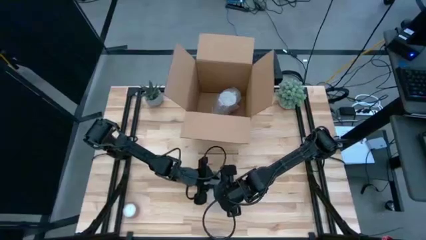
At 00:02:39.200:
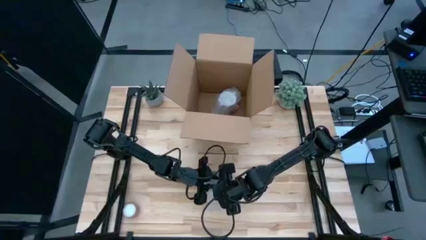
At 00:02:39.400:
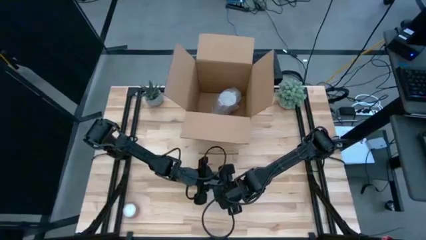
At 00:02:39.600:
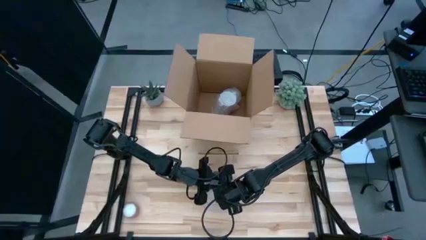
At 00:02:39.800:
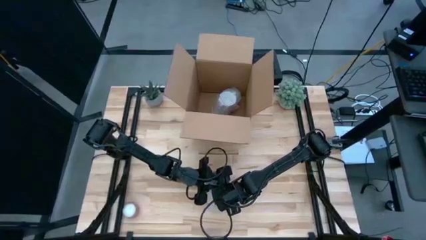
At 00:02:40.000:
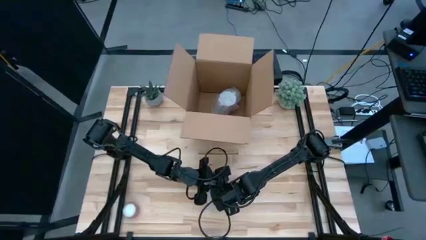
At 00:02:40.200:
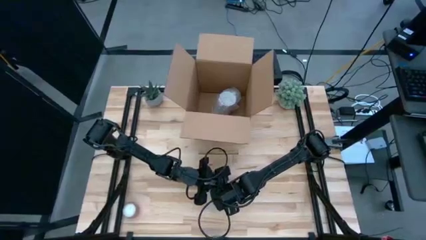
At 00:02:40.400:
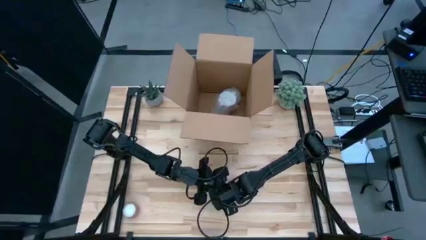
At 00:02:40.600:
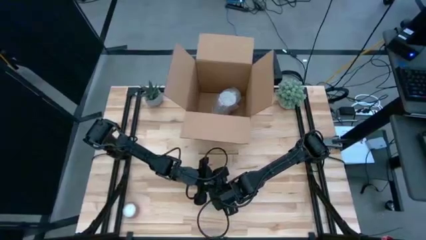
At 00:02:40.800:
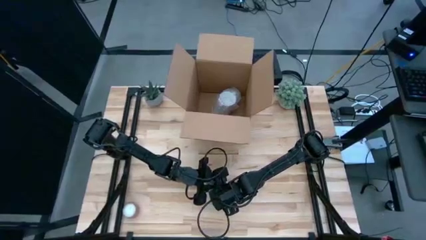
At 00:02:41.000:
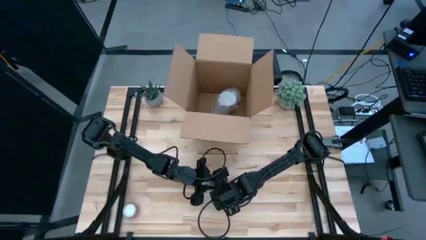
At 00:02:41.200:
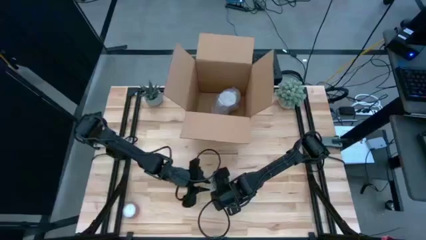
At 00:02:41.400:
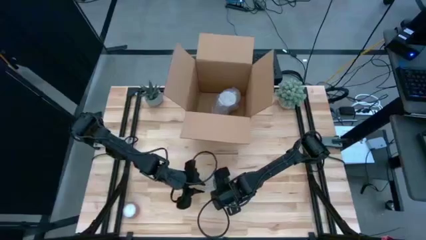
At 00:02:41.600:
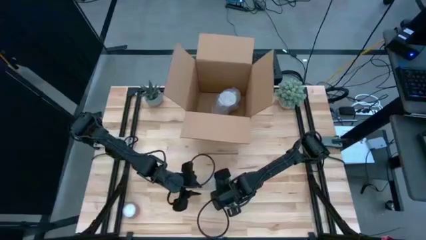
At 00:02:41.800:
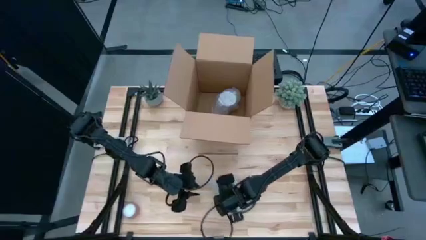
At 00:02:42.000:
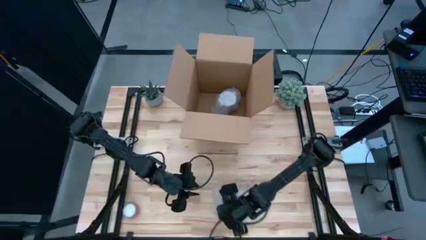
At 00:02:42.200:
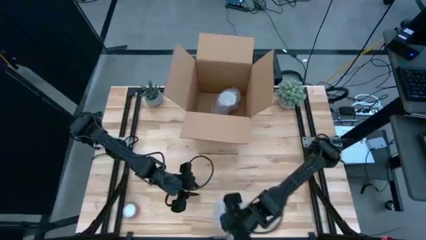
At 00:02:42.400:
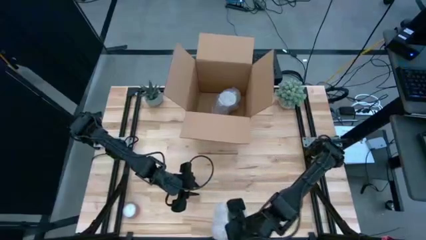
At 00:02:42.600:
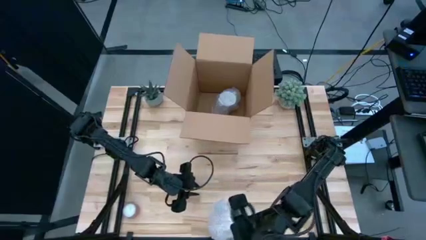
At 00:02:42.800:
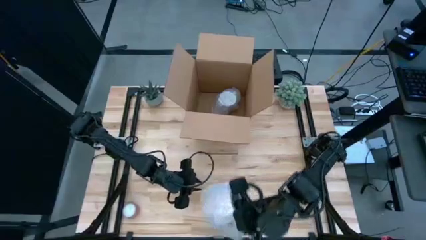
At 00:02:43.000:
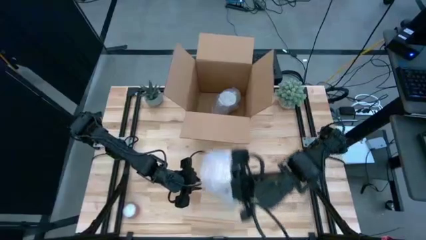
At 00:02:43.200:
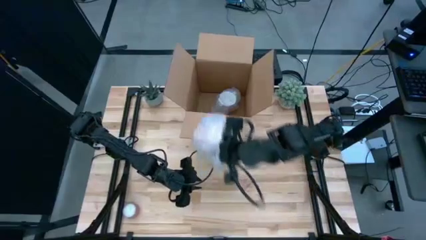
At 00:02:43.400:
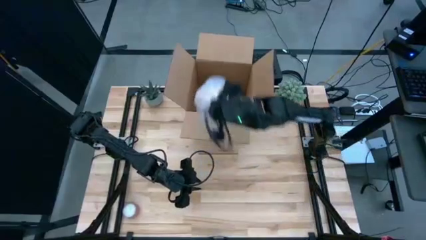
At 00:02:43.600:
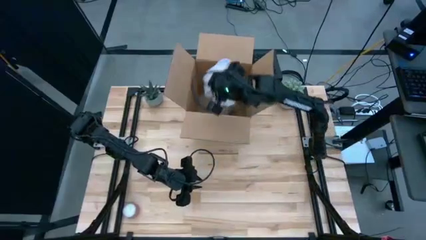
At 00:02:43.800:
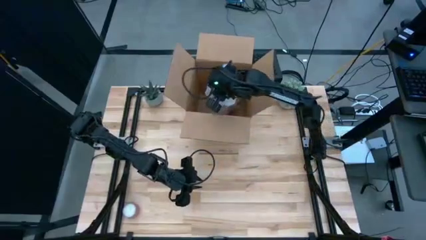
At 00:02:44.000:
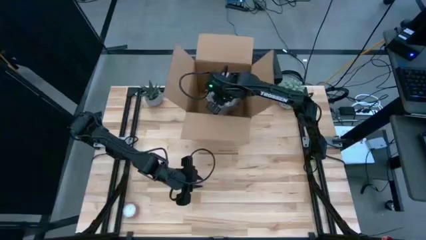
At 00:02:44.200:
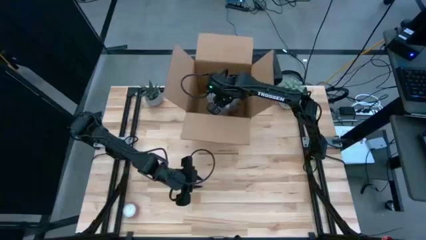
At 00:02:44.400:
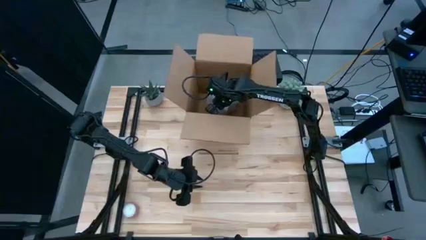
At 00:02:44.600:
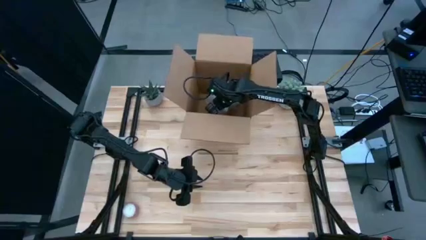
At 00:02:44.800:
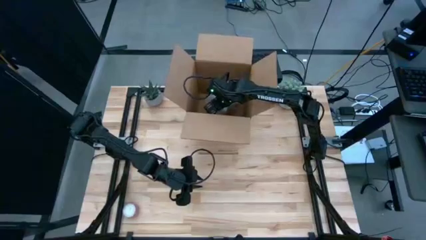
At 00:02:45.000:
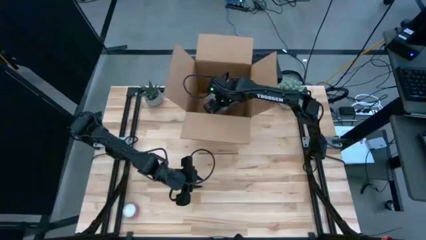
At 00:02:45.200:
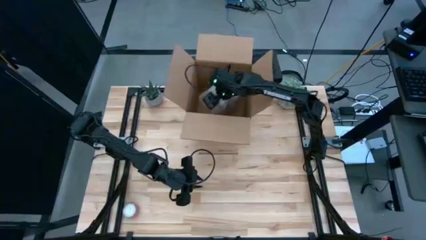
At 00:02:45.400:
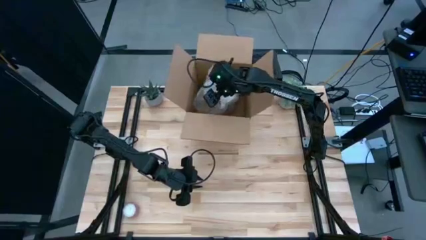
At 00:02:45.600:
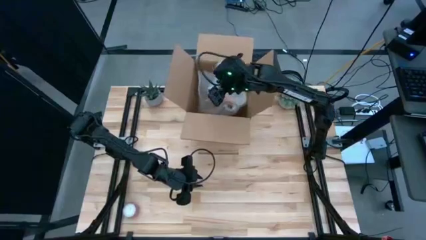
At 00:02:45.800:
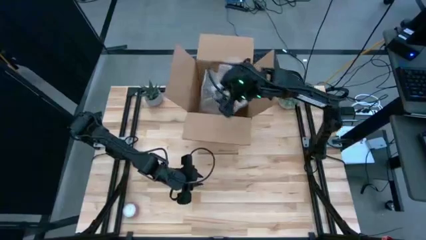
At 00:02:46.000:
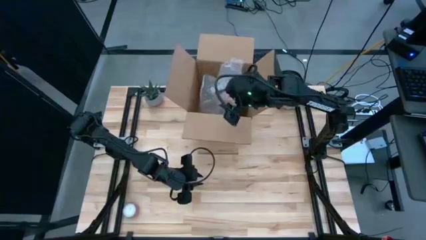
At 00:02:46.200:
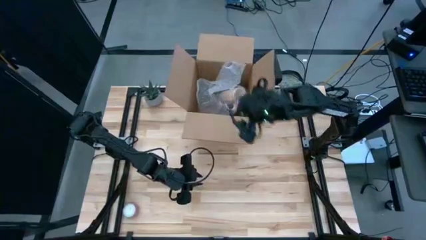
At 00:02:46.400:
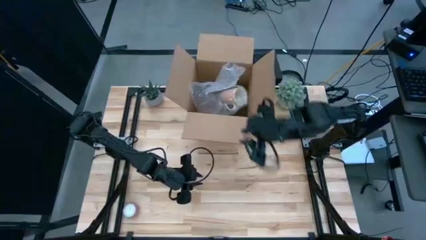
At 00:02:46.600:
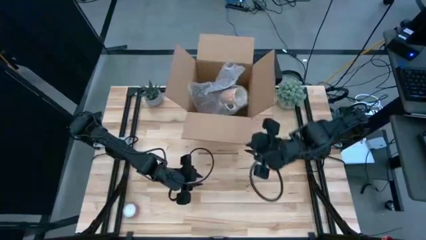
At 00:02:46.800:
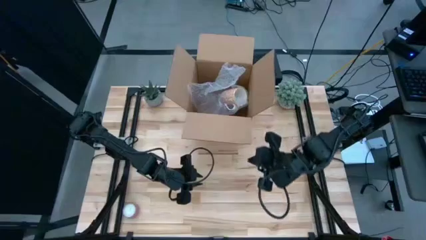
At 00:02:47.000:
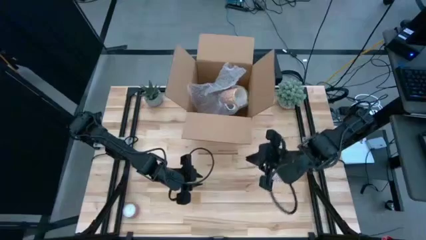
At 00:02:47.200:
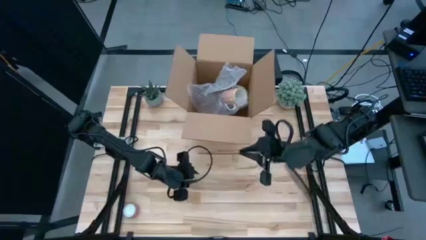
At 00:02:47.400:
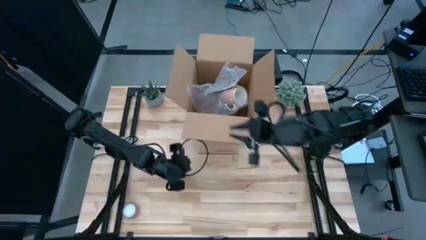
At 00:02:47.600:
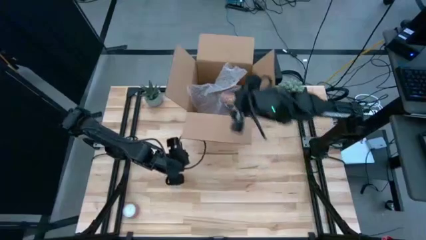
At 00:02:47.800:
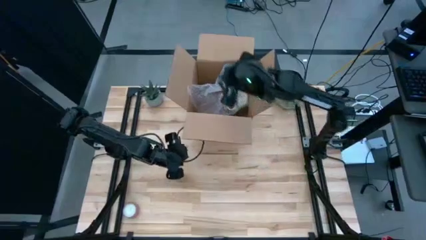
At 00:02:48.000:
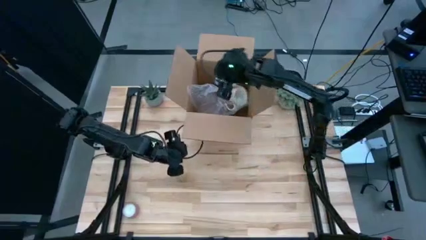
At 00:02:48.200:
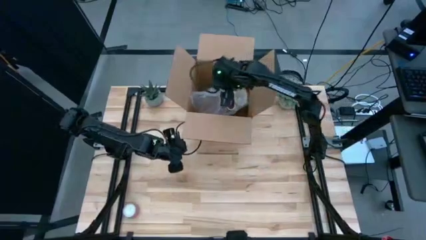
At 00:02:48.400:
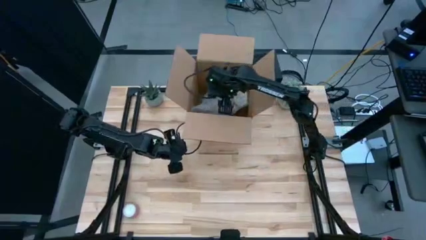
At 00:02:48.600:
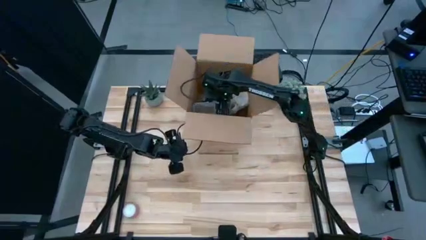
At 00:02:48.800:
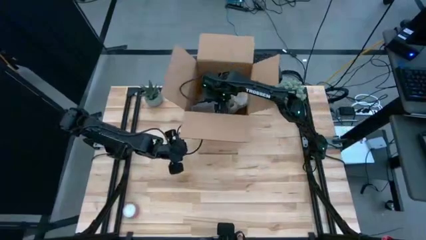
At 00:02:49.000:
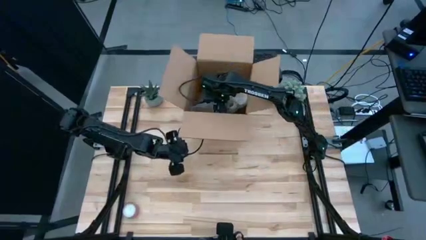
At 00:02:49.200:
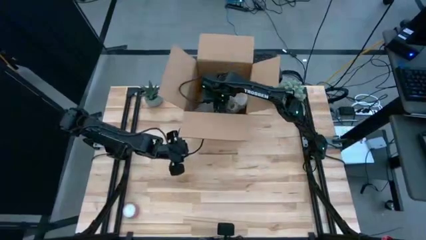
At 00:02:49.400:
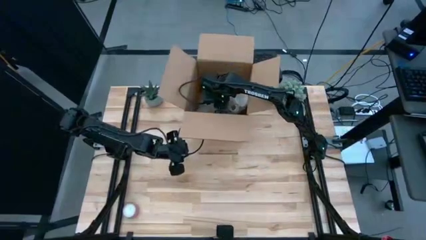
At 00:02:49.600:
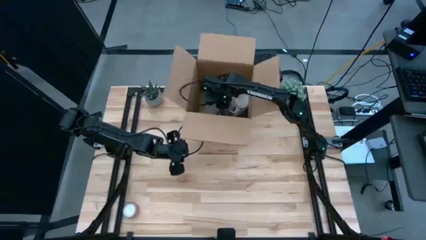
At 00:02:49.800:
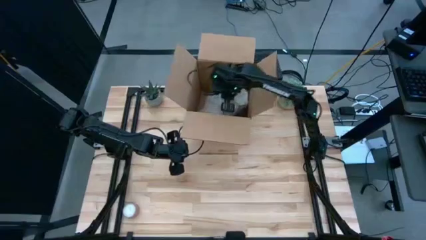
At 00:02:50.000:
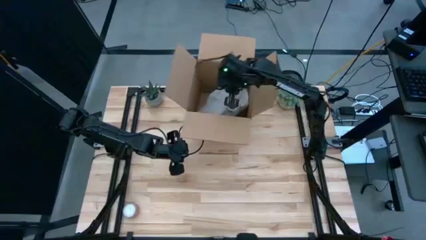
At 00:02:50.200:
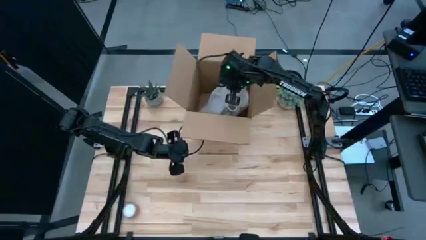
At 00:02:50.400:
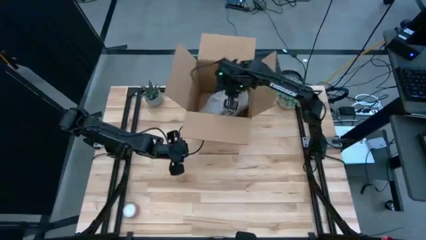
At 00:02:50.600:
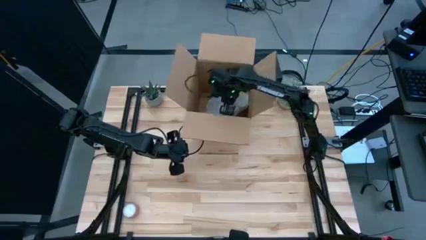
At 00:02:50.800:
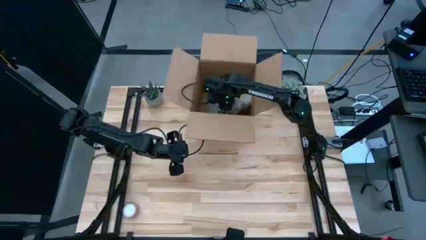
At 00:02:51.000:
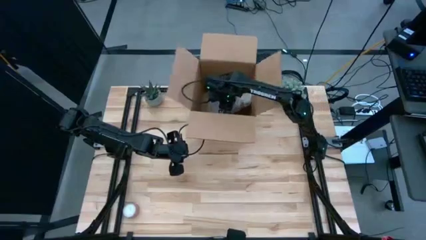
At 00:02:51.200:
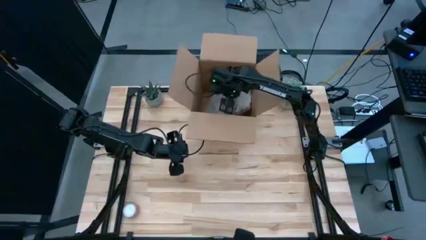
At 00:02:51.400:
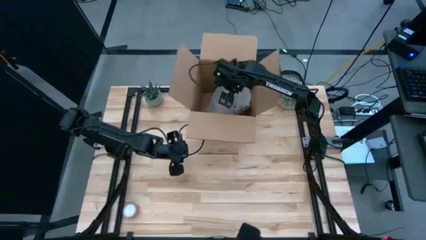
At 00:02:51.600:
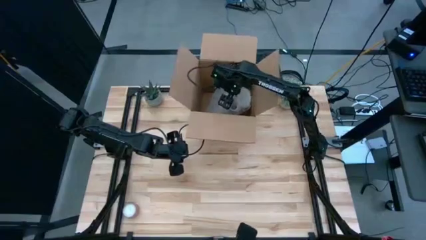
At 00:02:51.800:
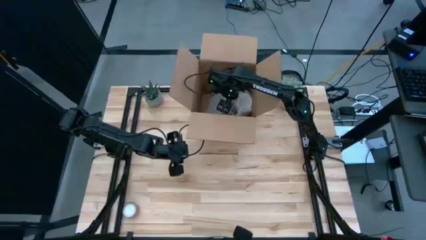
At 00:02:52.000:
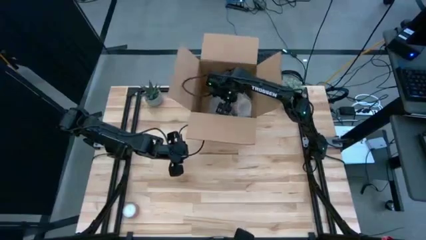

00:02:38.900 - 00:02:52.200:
Task: wrap mug
Put the orange wrapped cup into the box

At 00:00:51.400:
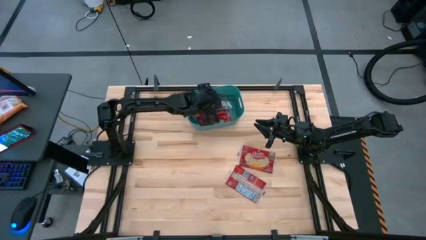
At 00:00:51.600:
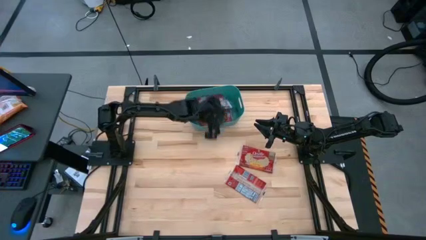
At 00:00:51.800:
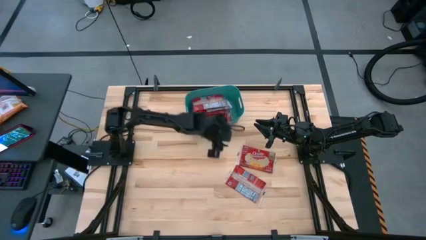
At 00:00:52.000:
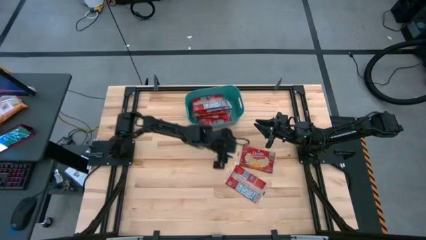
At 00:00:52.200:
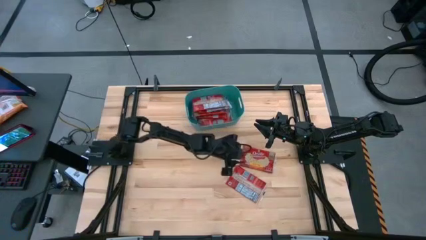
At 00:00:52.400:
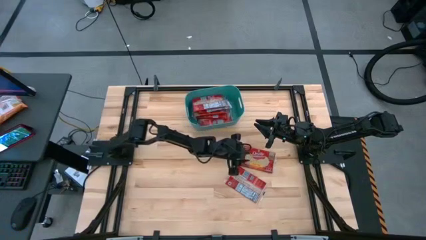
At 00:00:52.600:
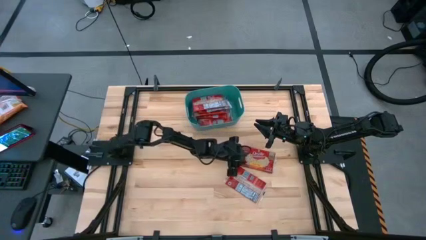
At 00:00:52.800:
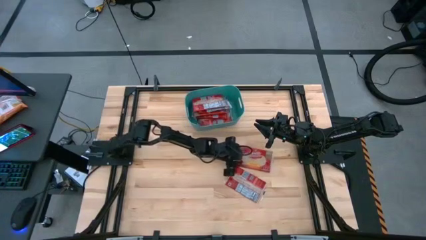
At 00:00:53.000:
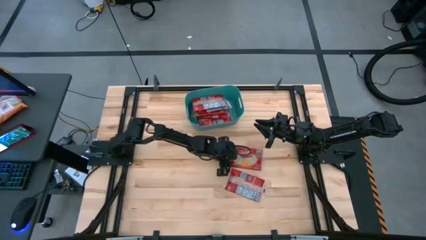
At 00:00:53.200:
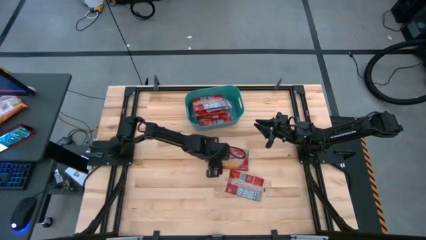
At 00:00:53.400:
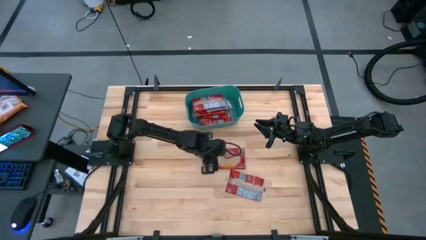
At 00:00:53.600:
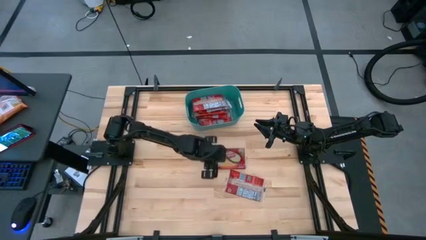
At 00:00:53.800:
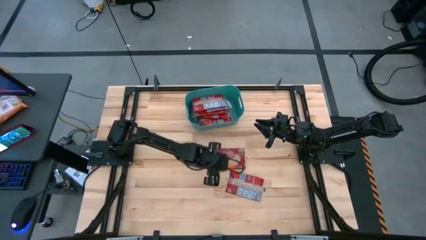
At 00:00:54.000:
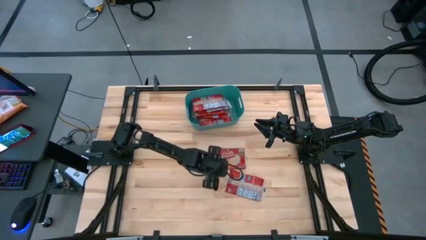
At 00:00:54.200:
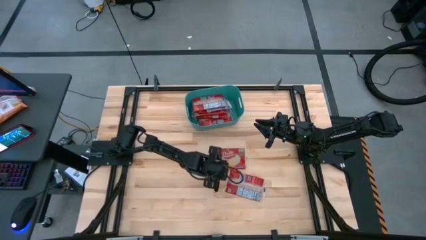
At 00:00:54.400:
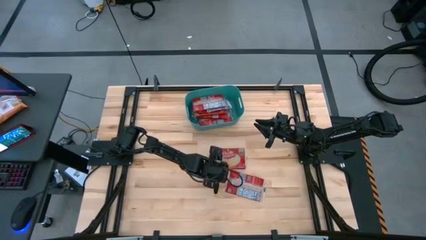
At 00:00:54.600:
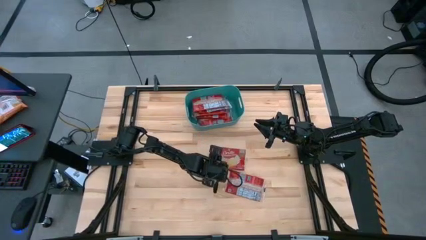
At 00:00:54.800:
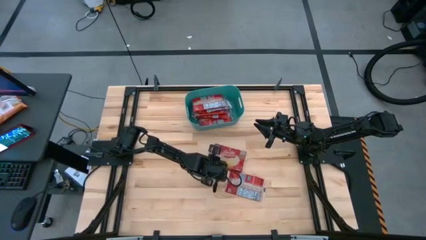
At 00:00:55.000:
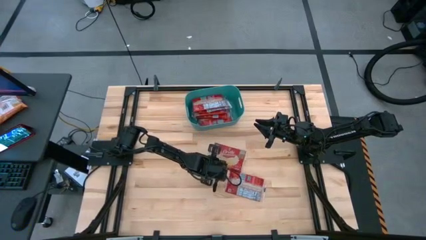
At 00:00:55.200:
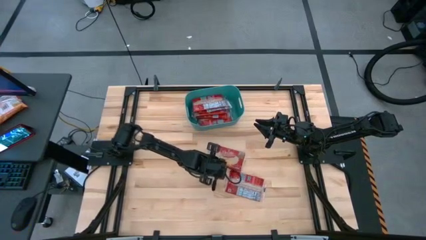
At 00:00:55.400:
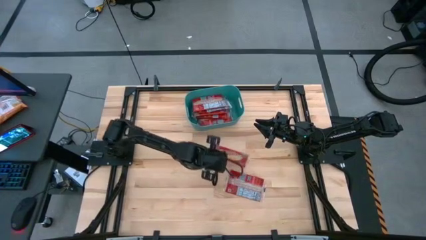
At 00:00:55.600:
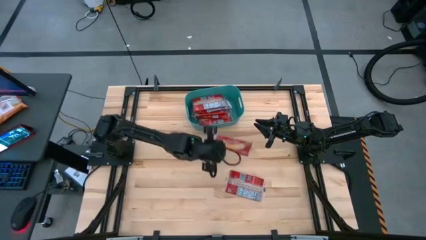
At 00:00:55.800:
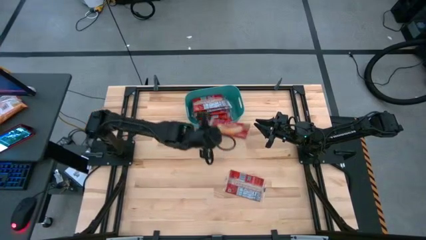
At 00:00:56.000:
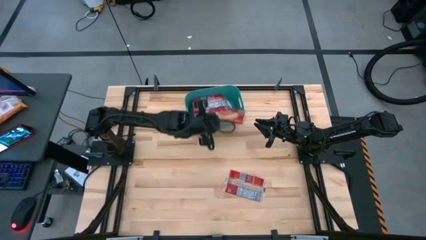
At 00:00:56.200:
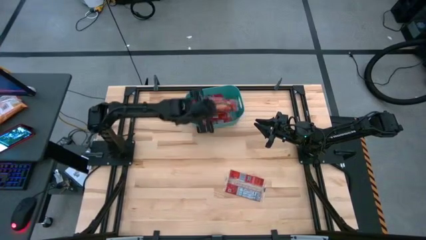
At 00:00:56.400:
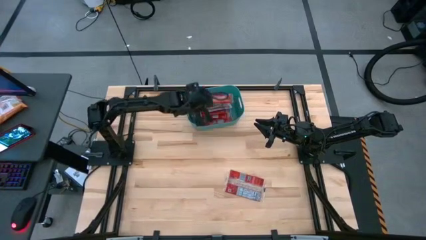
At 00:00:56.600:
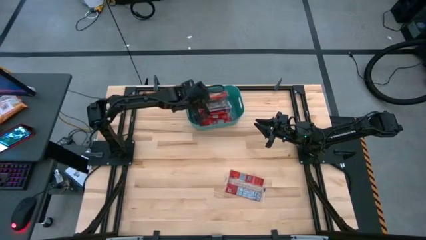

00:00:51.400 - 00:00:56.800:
Task: Sort popcorn bags into baskets
Put the top red popcorn bag into the blue bin
